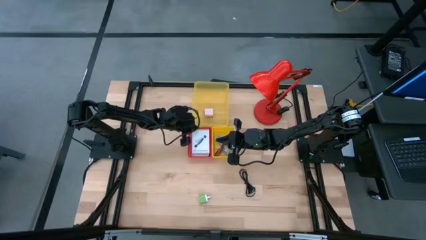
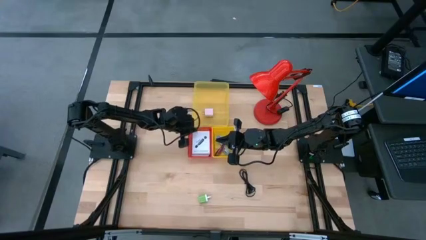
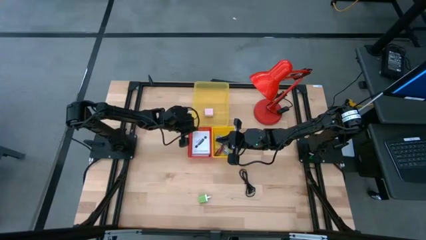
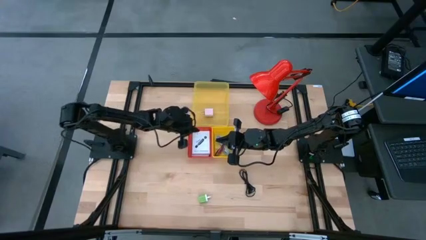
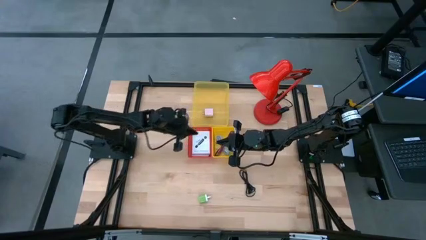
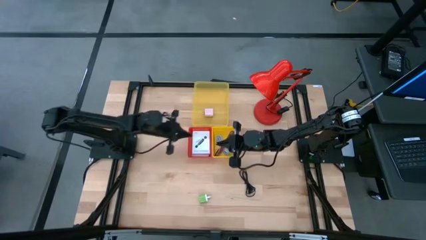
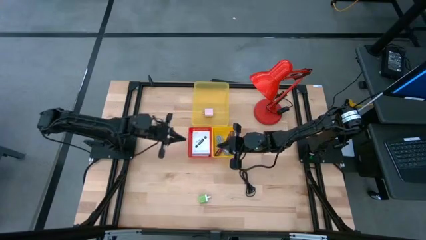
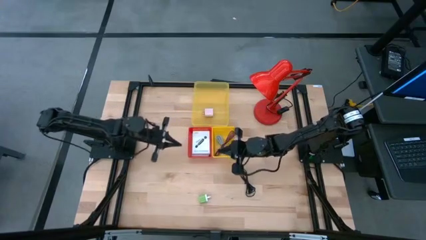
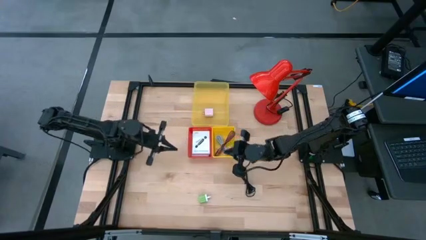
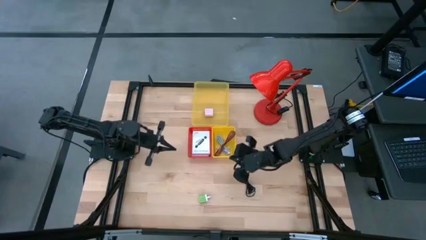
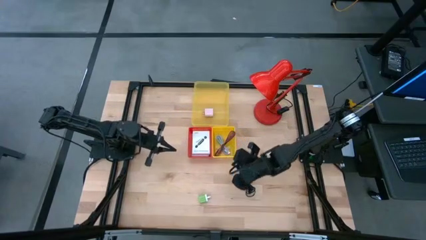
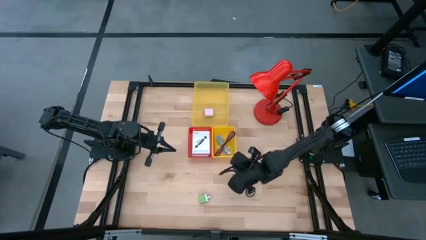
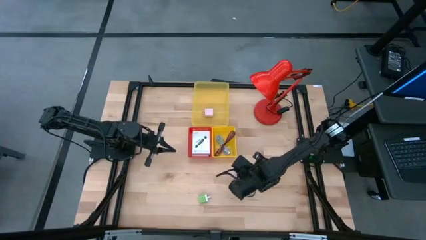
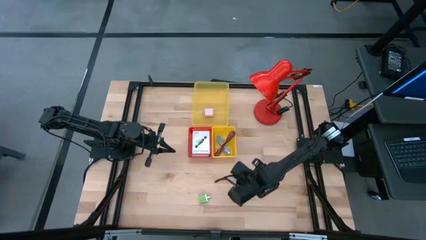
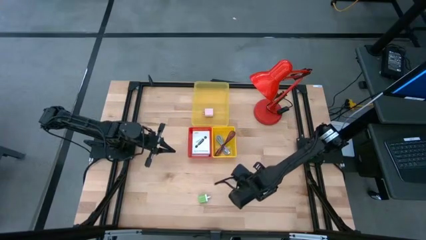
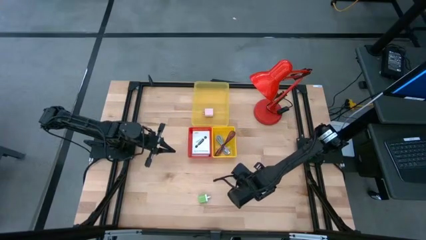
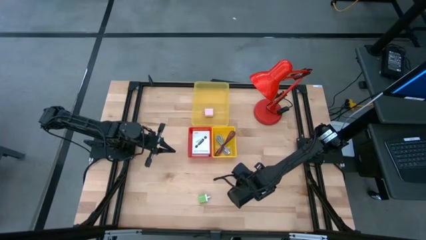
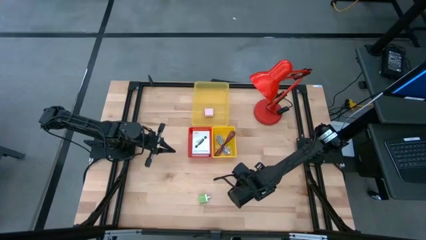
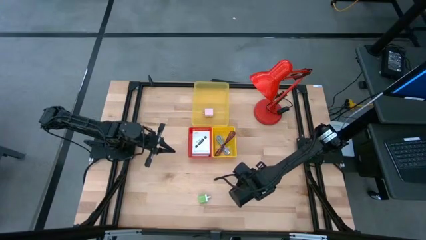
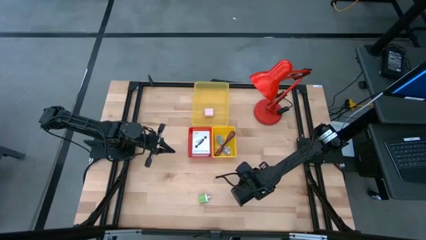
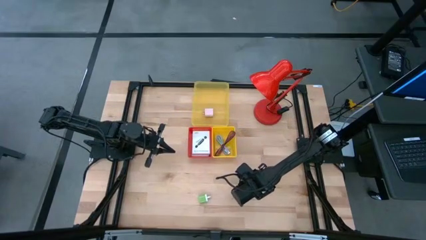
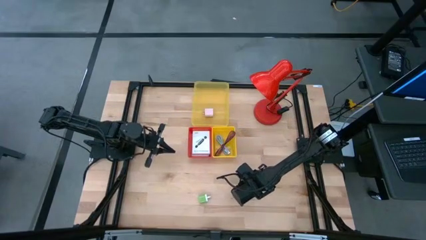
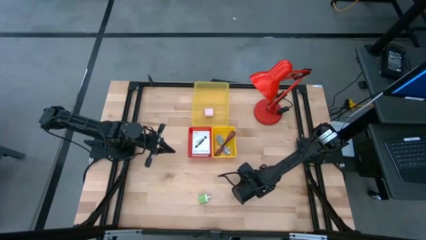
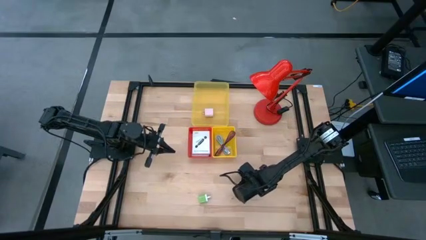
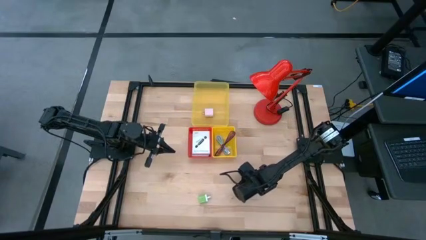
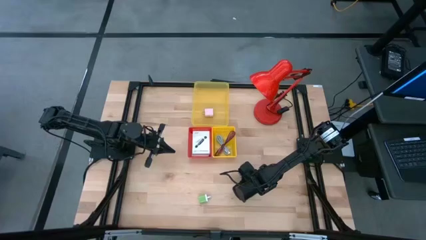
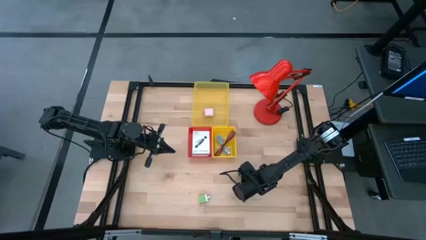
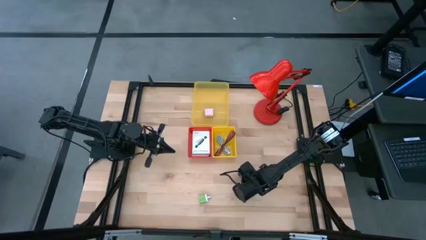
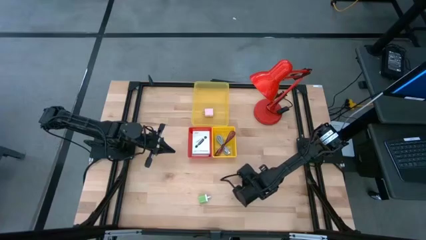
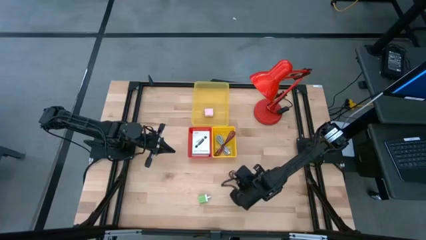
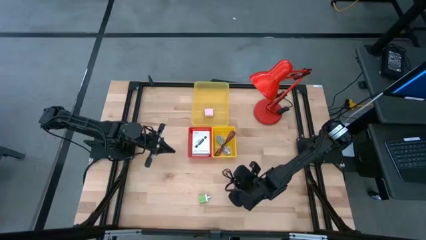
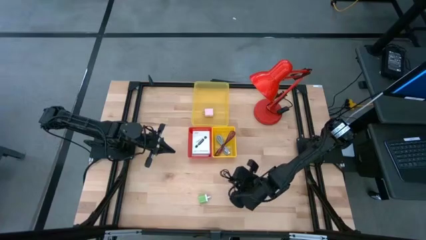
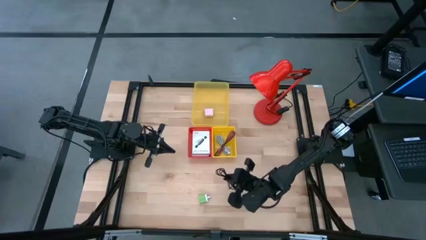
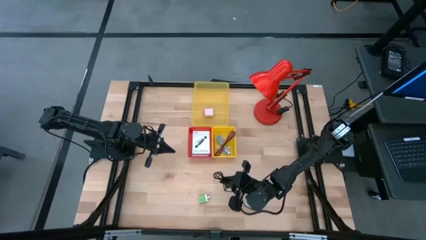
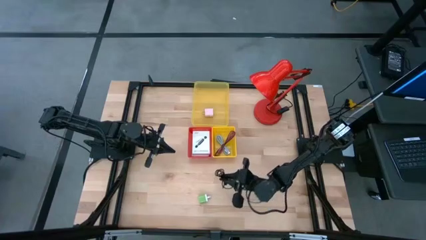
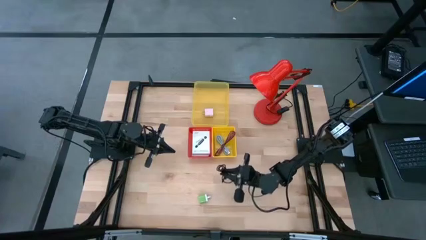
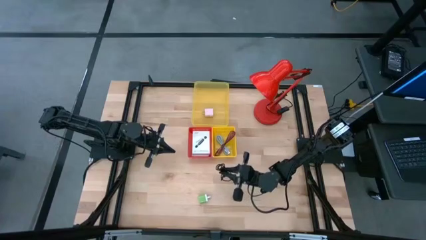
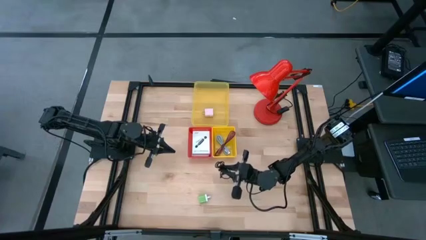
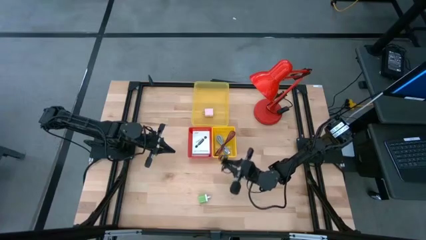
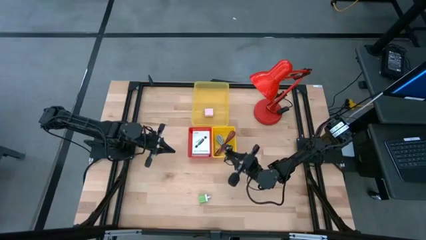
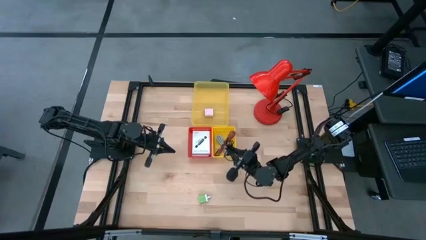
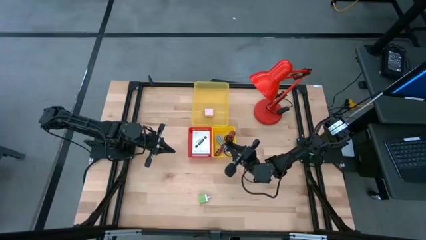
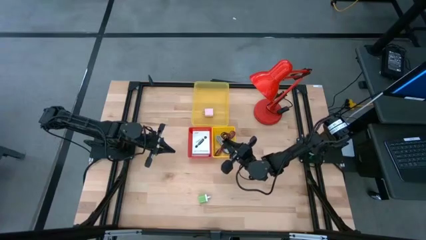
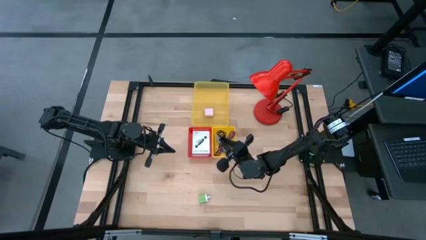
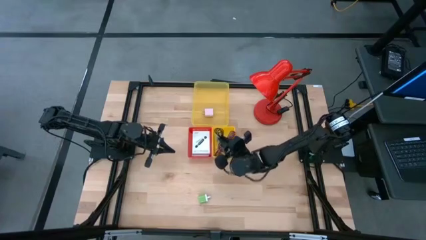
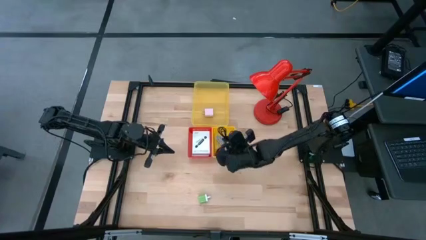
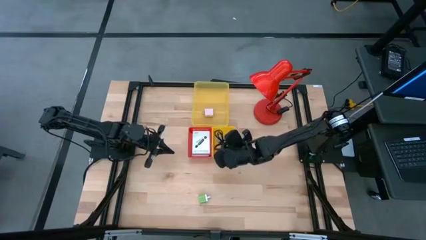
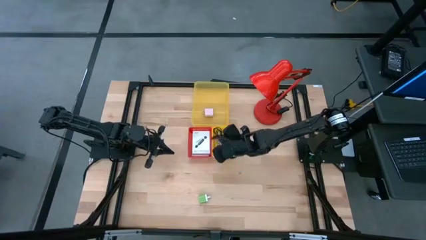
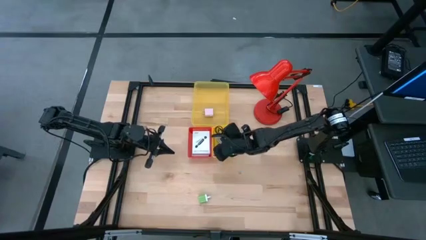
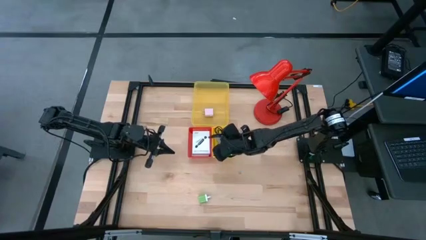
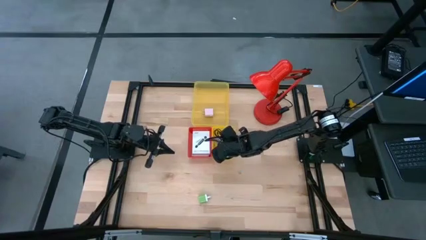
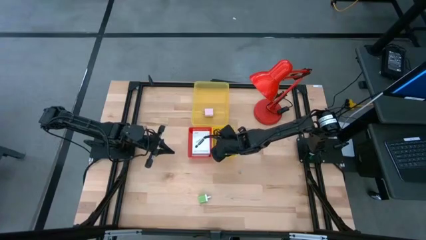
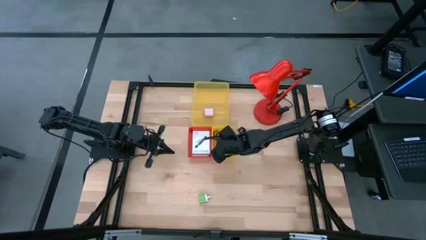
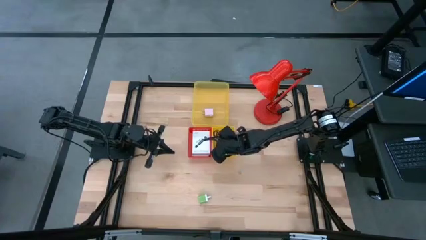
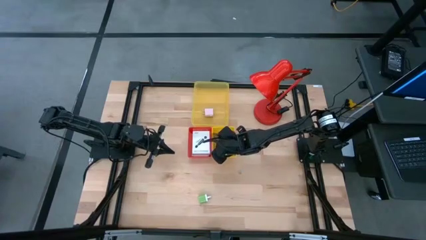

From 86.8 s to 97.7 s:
Task: Pick and place items into bin
Put the black charger cable into the yellow bin

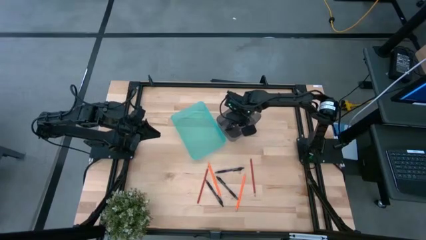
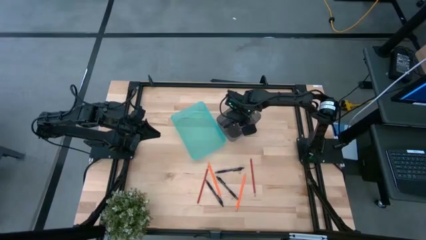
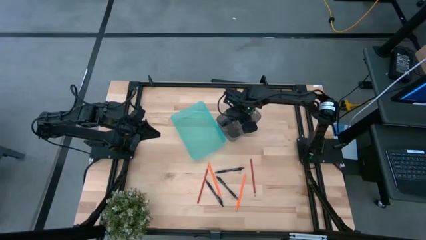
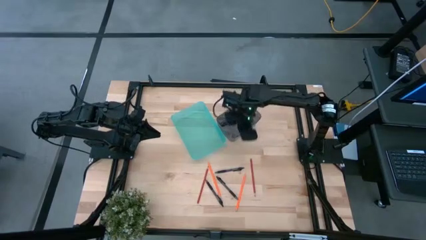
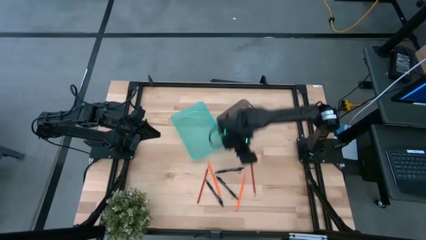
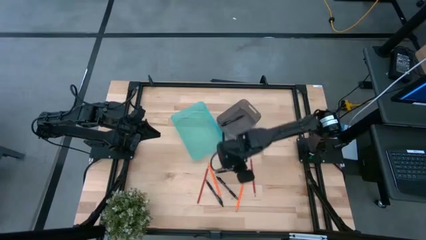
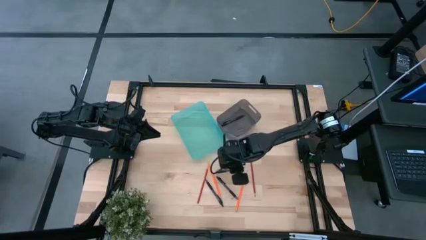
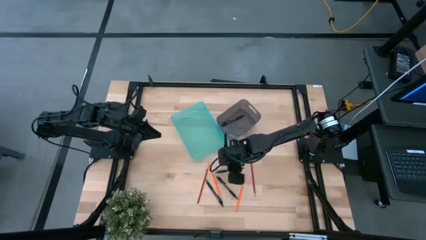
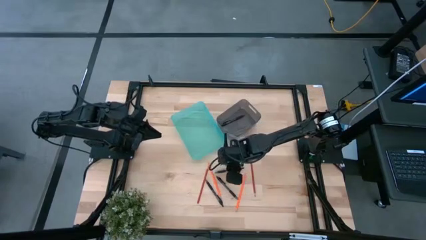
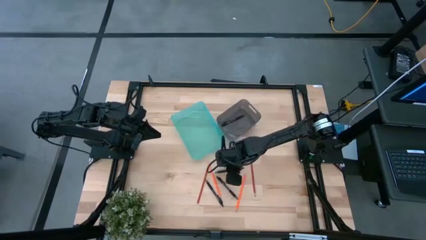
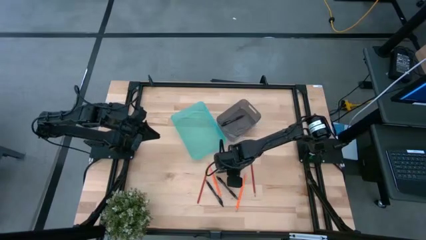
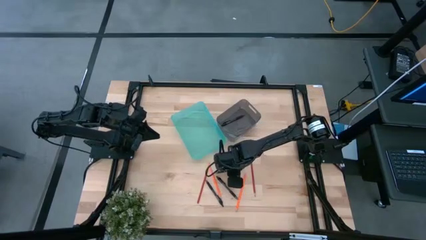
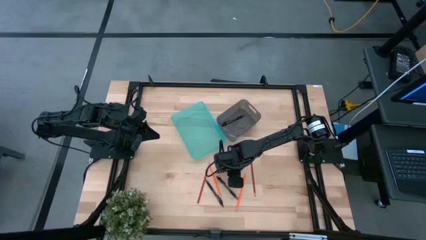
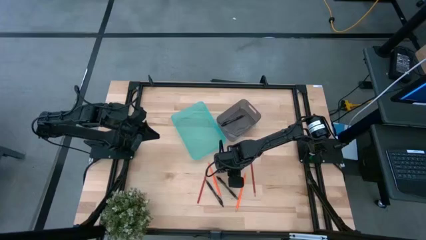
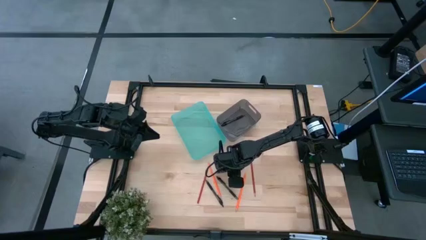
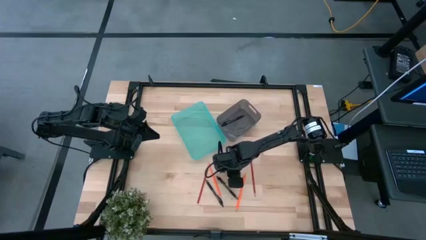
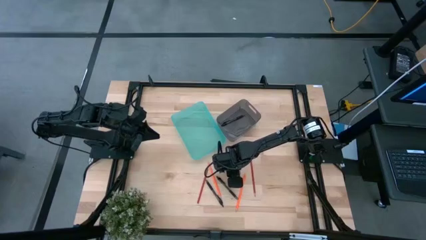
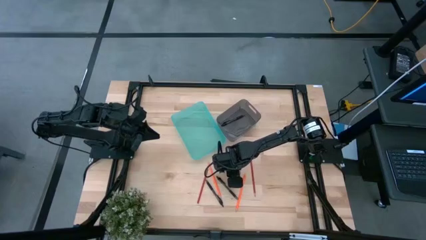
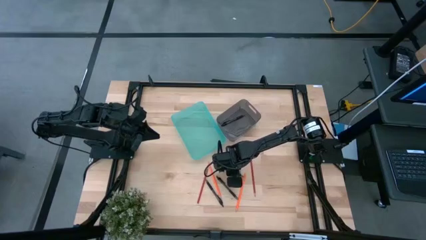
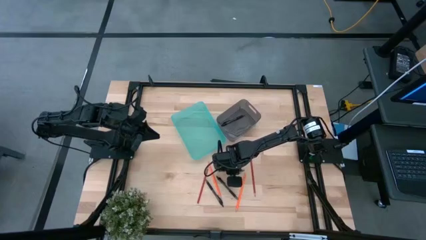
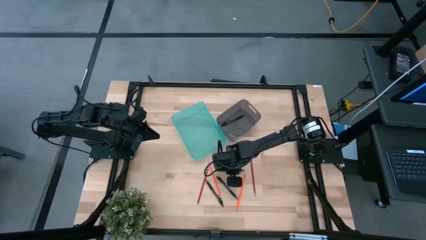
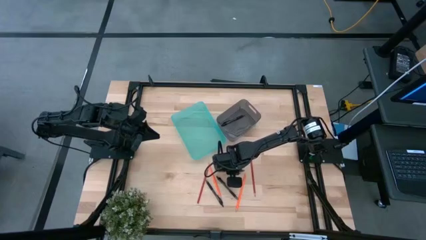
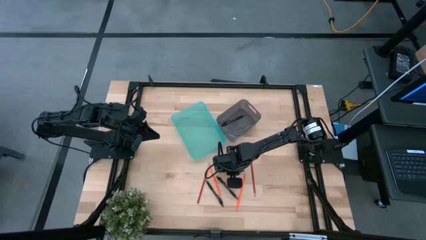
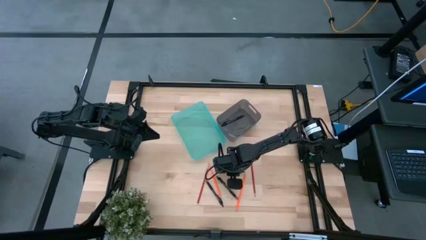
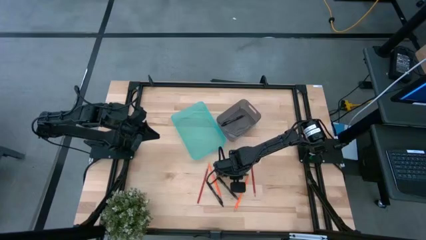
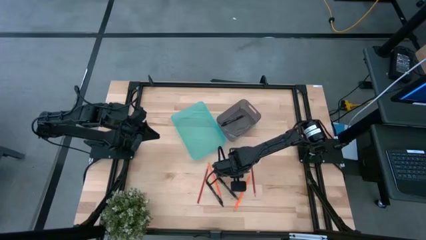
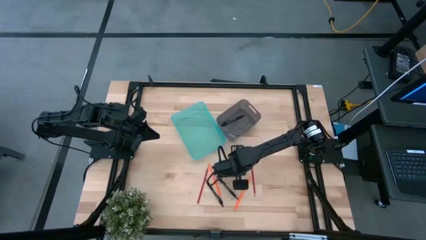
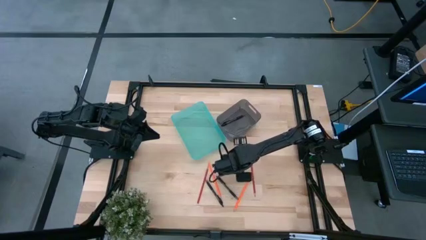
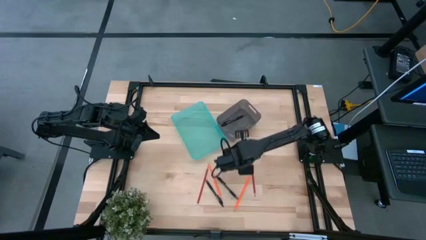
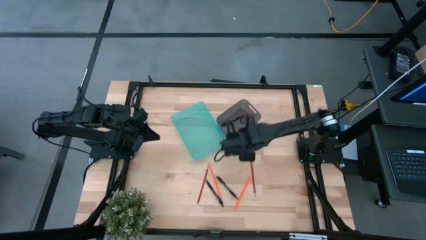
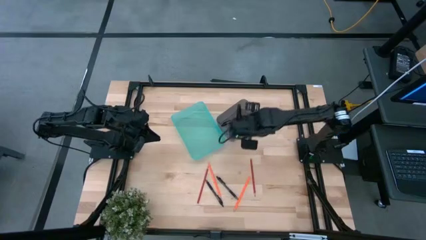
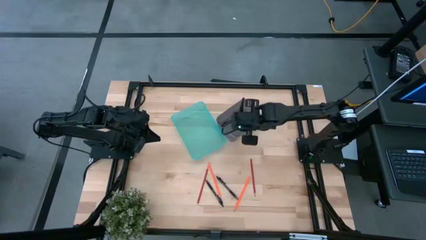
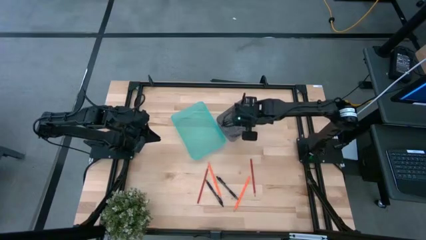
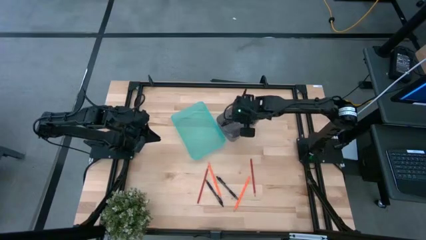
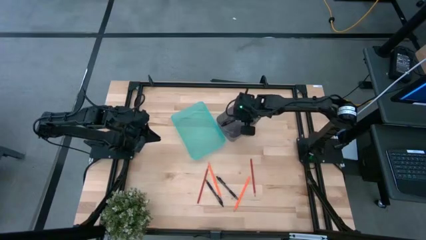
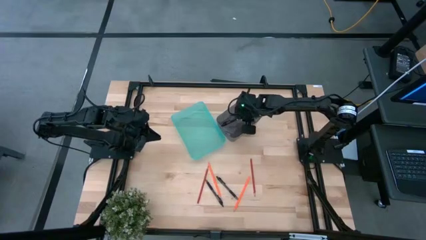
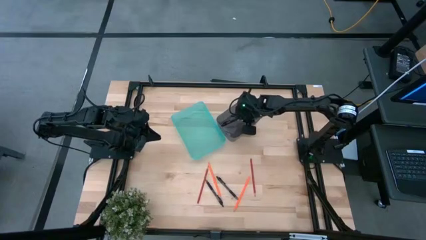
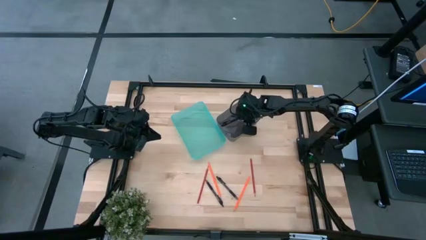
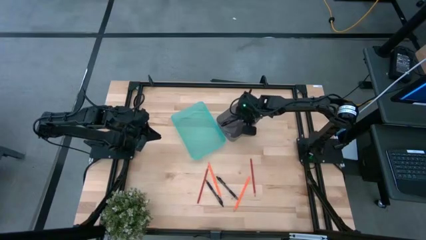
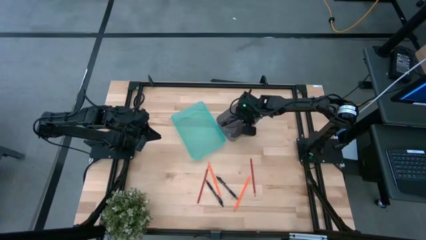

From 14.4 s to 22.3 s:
Task: Sort pens & pencils
Put the top black pen into the black bin
